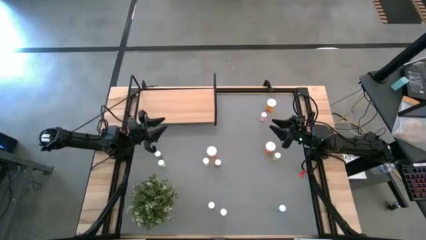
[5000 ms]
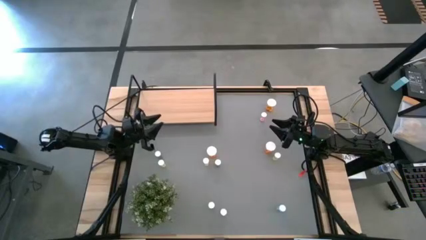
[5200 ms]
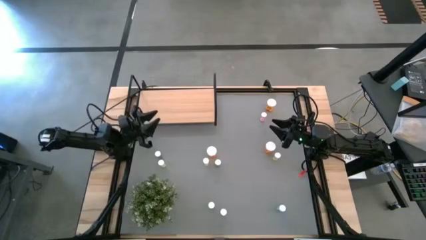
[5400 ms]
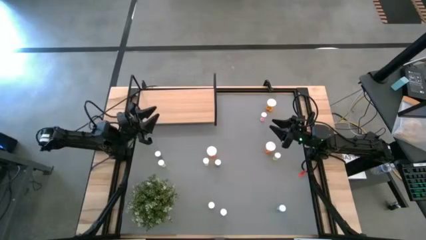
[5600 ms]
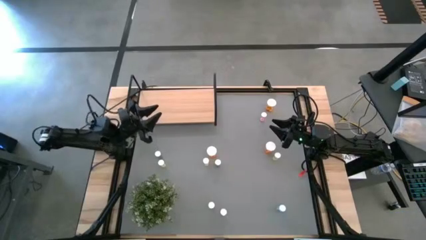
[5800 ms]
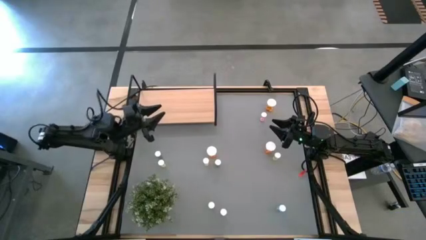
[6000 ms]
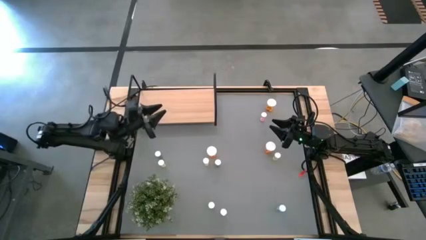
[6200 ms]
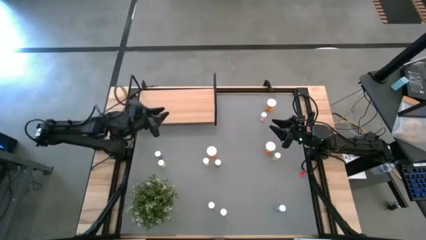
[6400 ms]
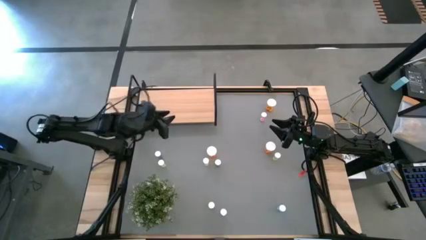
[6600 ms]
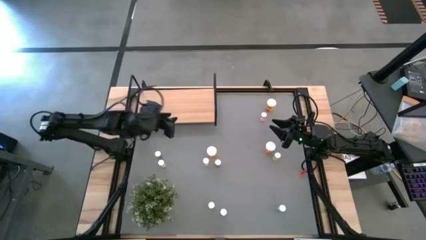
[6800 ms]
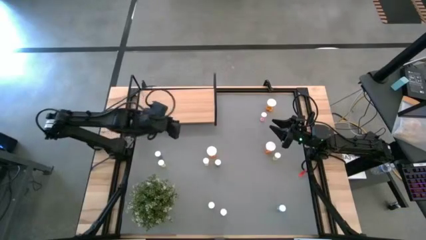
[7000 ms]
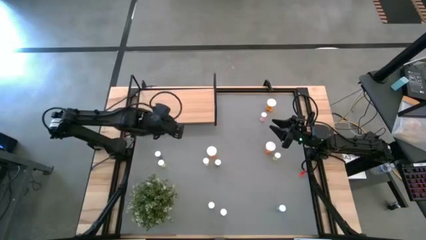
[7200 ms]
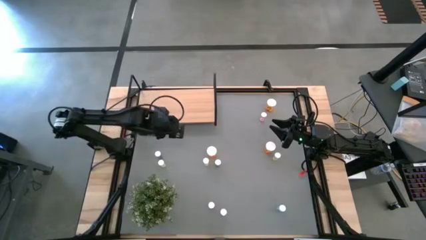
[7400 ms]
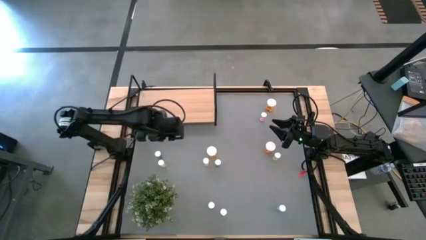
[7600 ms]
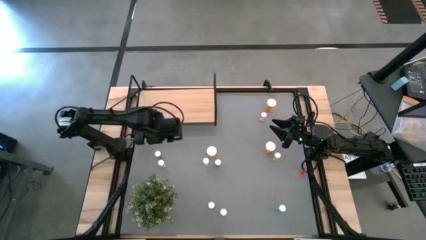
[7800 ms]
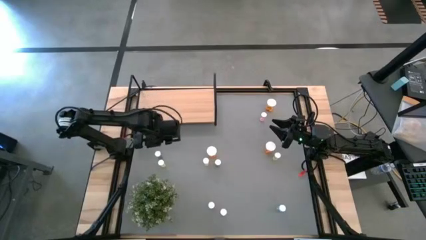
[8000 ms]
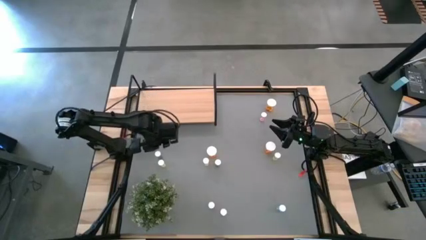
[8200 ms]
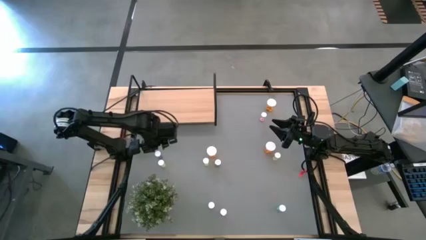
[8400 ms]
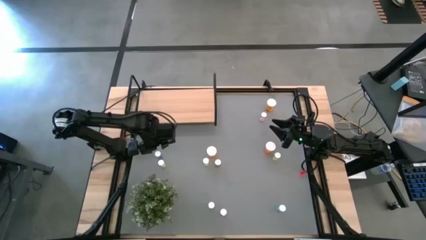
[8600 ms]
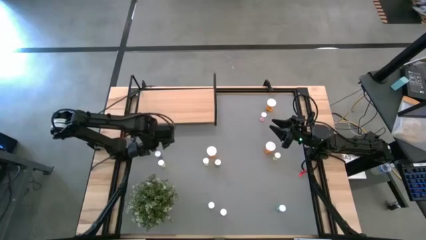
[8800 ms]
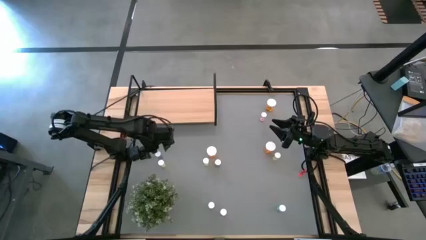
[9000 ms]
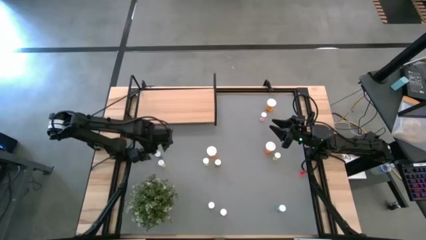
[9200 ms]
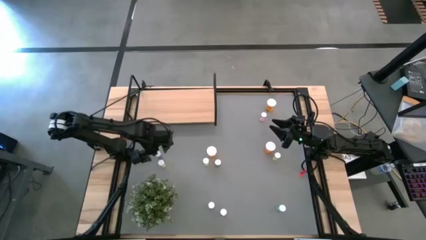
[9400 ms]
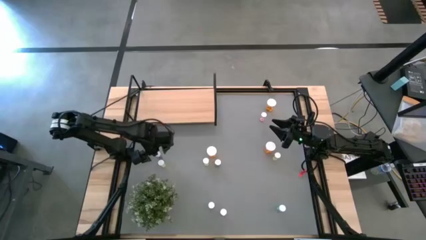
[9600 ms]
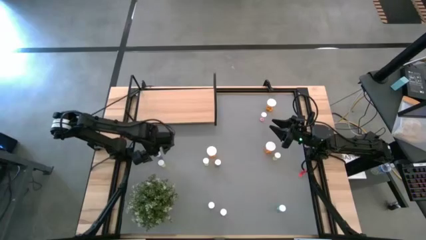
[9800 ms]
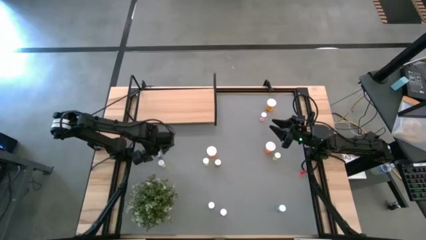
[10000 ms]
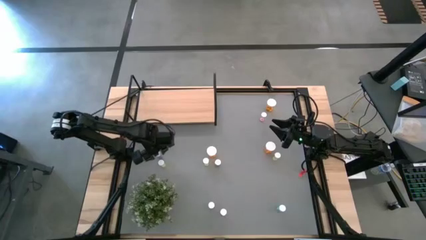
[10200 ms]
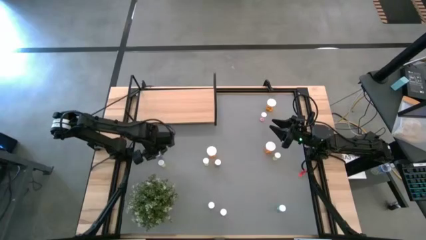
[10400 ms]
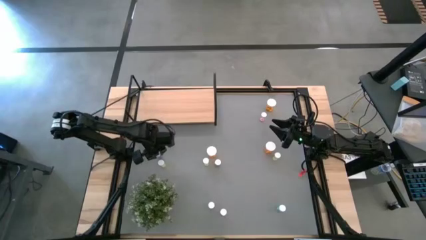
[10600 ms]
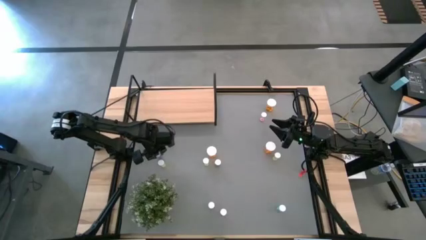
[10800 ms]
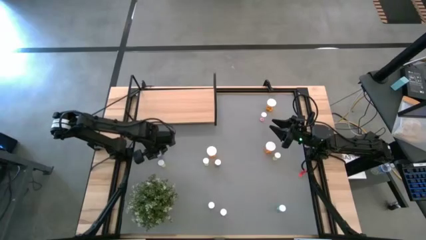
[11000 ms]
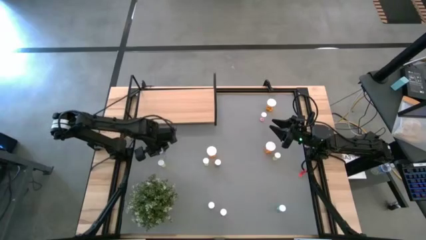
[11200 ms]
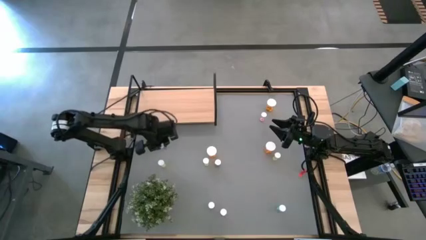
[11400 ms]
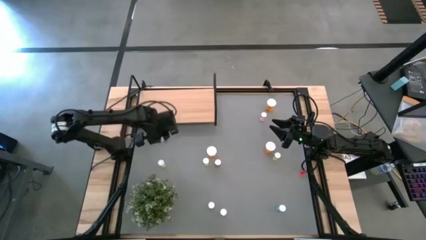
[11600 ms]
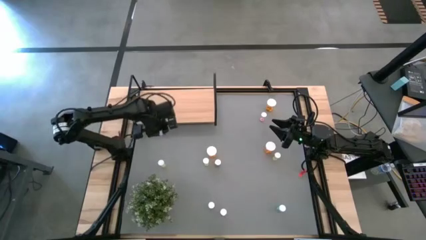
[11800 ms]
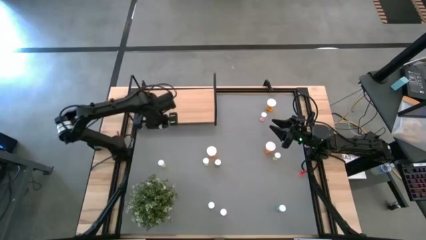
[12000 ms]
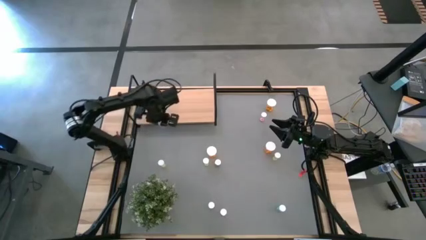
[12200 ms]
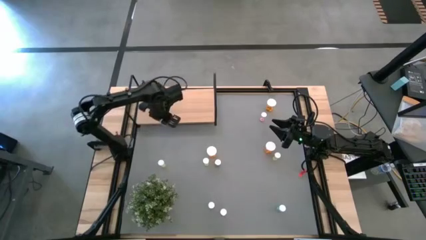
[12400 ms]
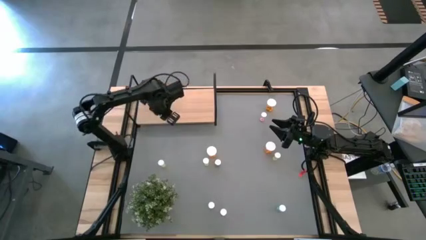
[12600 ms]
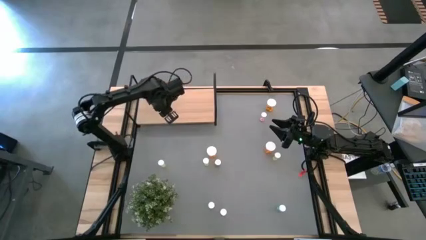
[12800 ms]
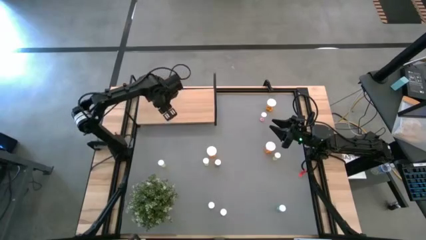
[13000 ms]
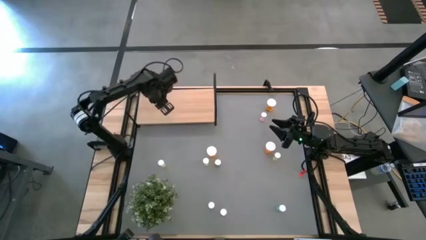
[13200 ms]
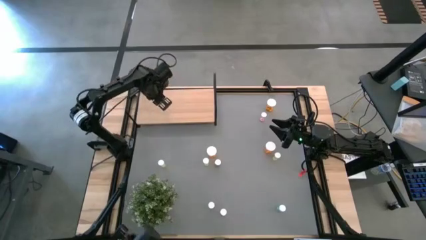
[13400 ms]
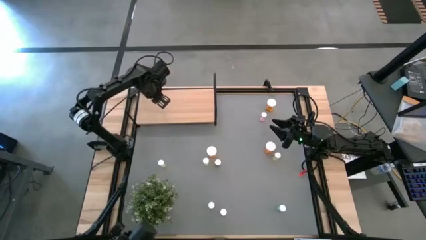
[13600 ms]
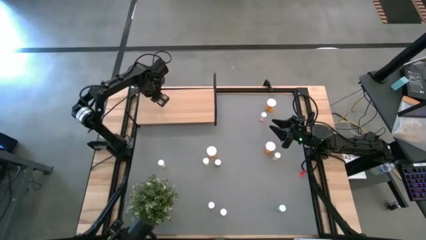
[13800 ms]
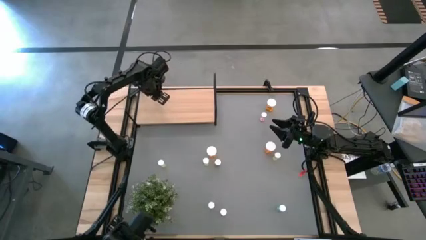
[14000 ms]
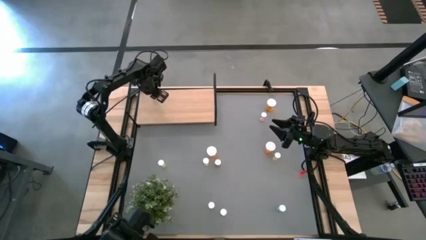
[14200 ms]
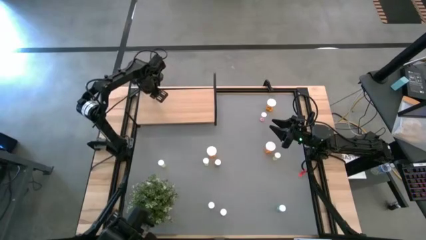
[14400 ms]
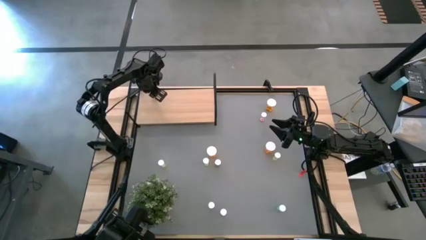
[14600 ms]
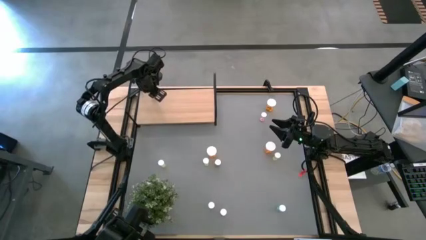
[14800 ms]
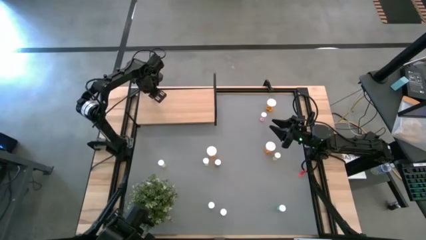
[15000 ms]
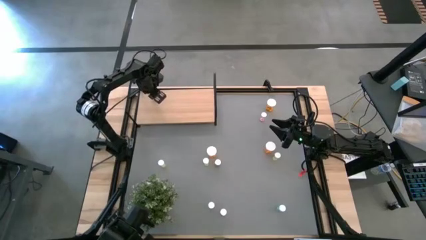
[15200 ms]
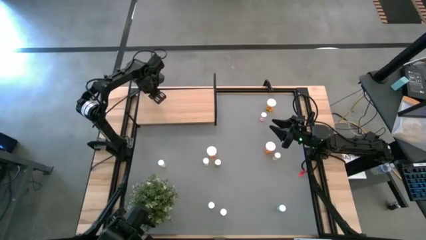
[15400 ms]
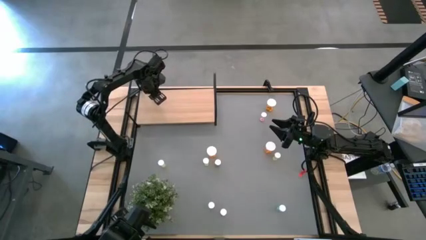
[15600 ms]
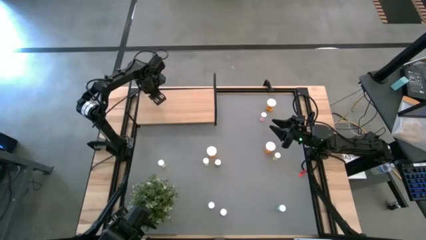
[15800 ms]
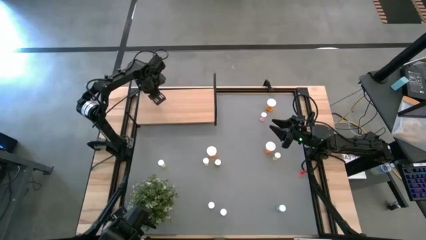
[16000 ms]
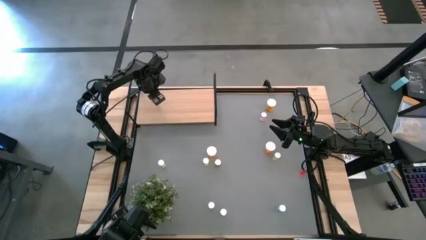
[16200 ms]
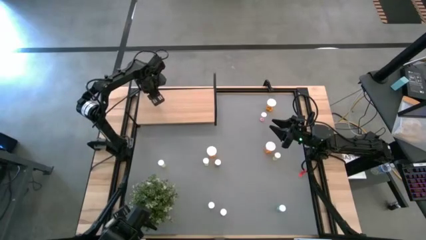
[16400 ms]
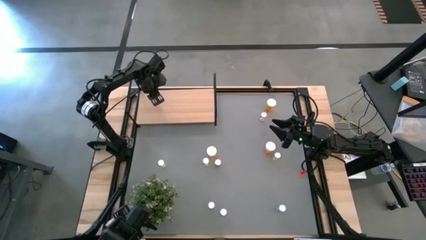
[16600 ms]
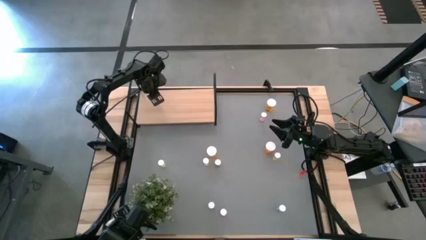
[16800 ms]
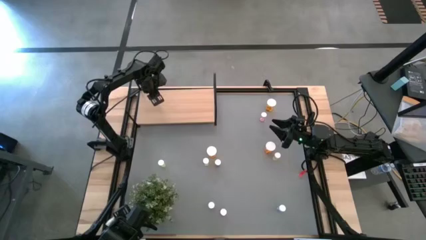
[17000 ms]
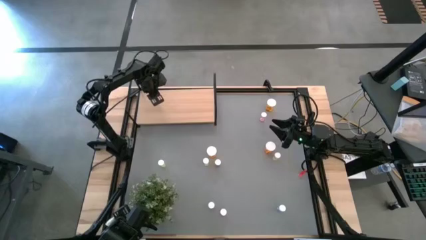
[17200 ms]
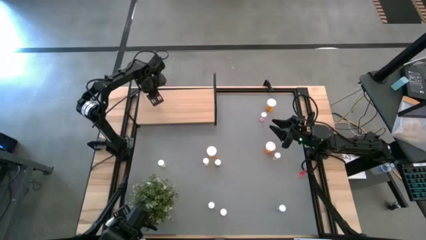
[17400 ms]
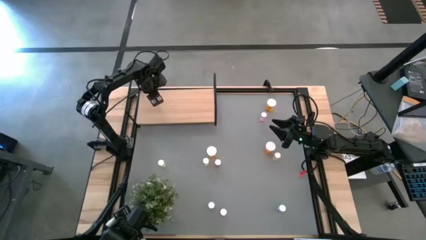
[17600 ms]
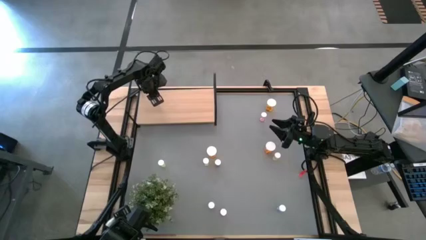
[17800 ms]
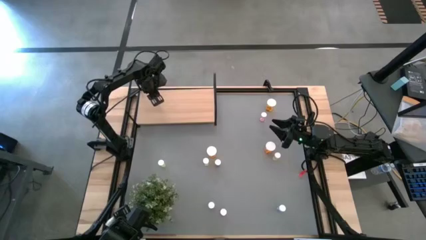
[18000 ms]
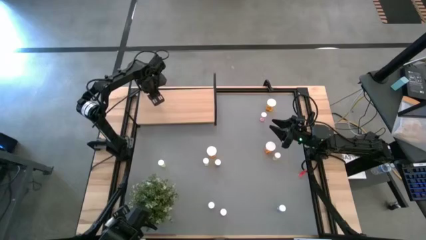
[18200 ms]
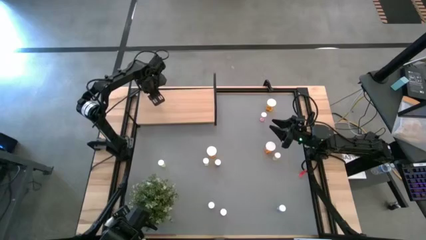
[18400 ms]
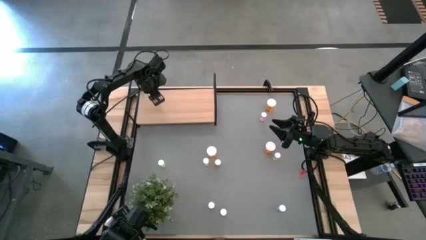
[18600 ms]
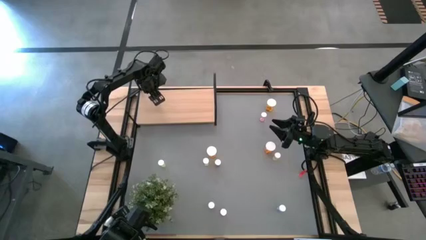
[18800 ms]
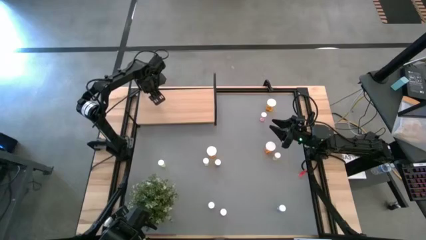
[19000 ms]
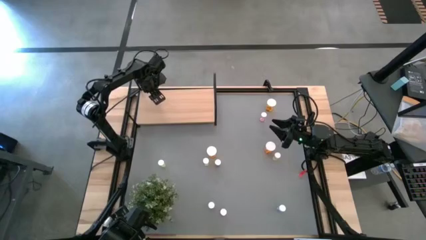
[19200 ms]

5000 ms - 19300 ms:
Task: Pick and place medicine bottles onto shelf by color
Put the top left blue pill bottle on the shelf
